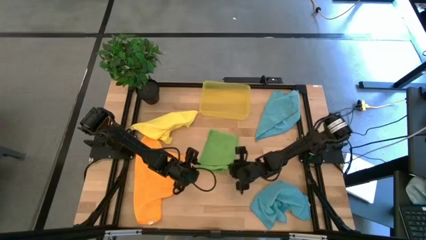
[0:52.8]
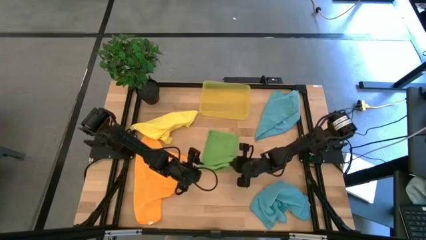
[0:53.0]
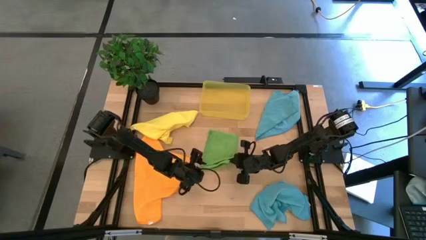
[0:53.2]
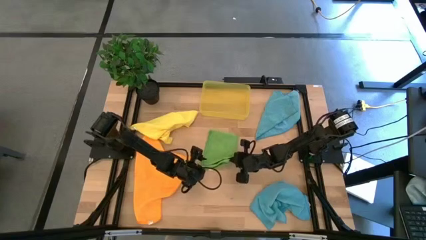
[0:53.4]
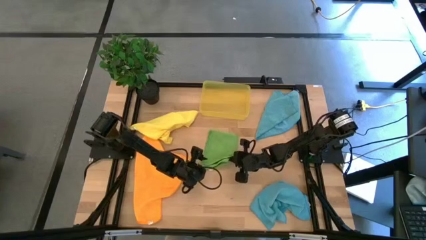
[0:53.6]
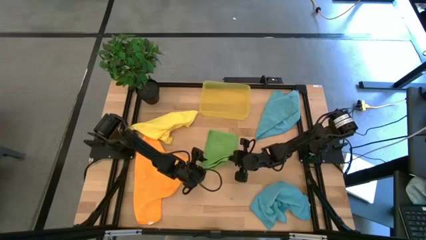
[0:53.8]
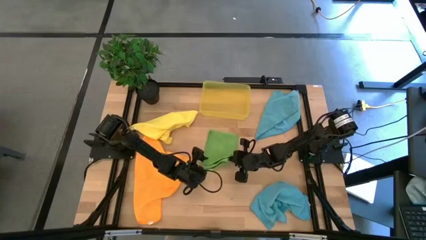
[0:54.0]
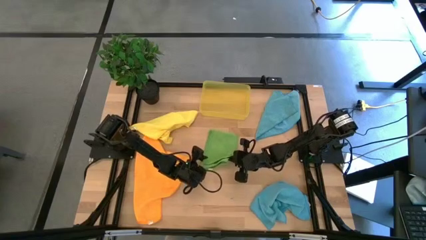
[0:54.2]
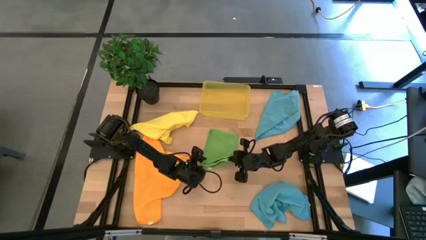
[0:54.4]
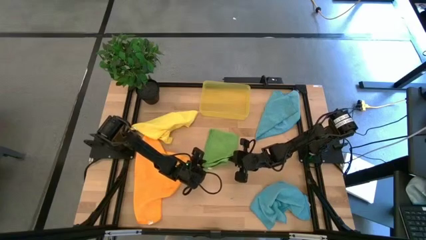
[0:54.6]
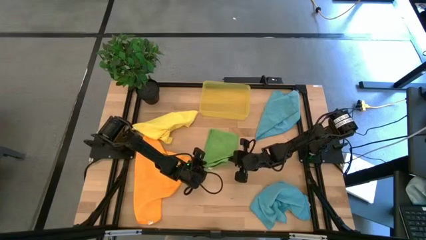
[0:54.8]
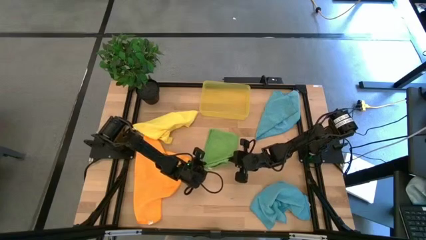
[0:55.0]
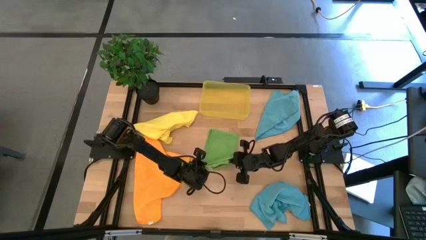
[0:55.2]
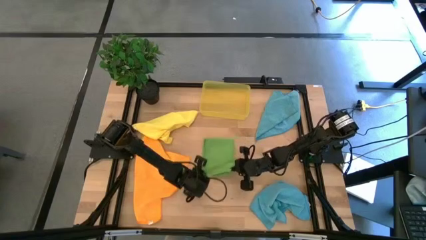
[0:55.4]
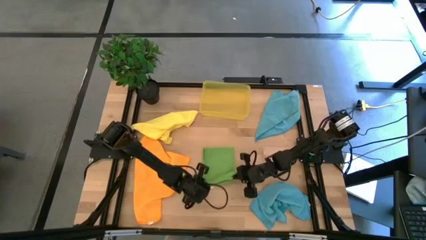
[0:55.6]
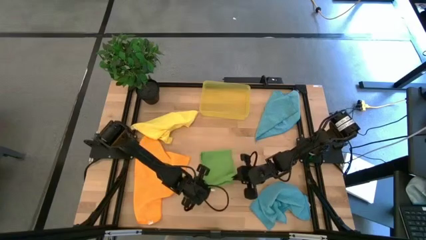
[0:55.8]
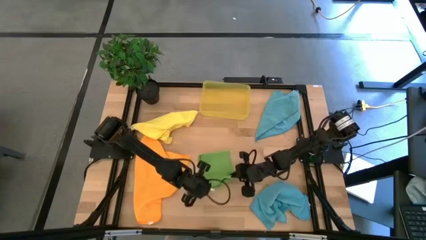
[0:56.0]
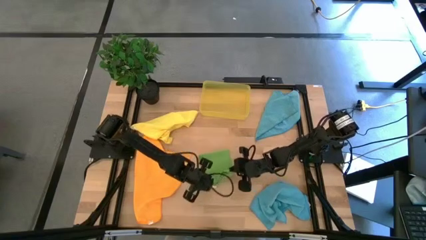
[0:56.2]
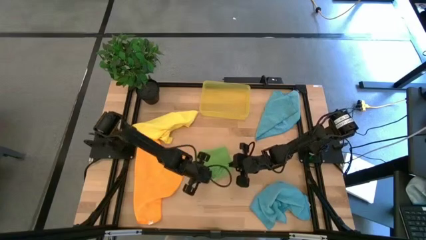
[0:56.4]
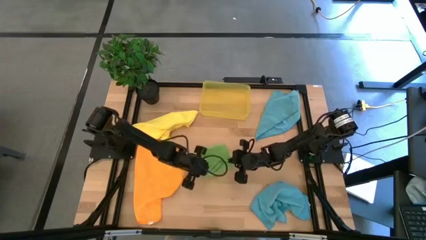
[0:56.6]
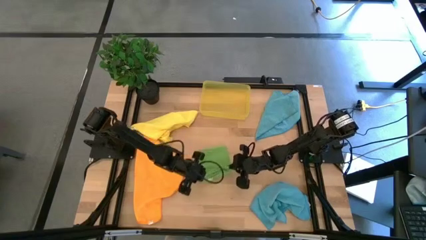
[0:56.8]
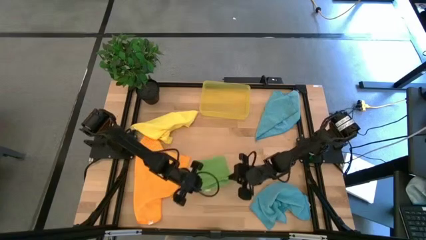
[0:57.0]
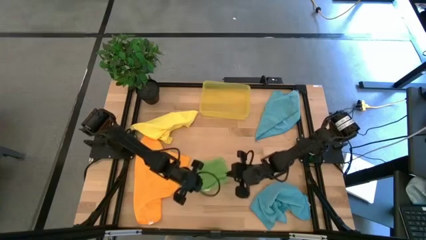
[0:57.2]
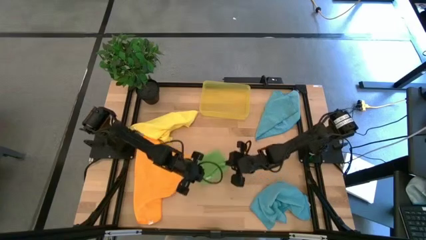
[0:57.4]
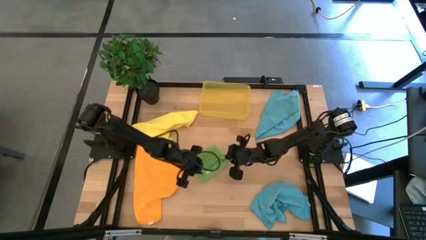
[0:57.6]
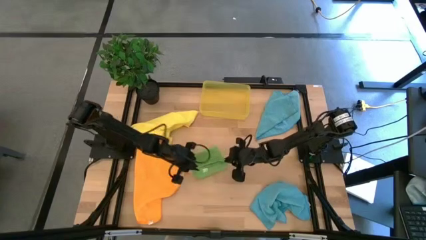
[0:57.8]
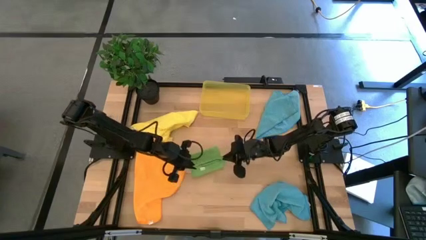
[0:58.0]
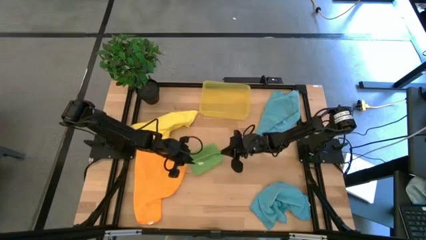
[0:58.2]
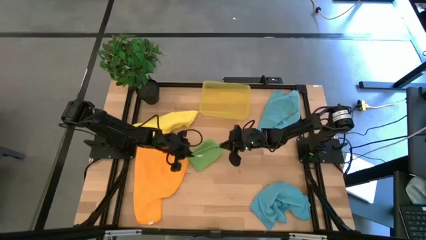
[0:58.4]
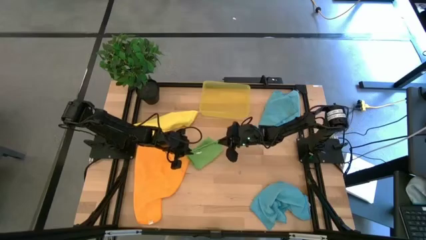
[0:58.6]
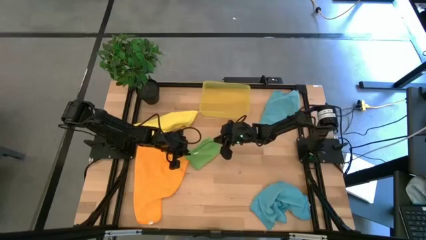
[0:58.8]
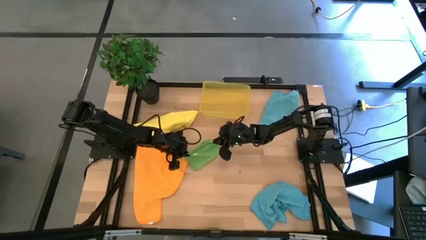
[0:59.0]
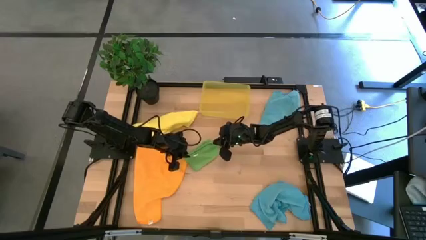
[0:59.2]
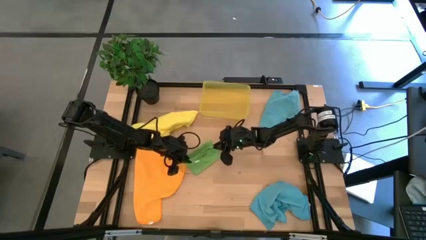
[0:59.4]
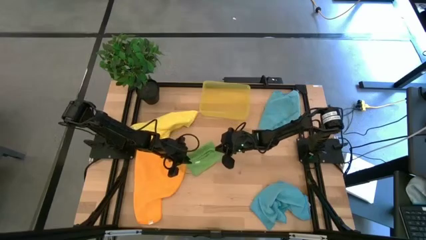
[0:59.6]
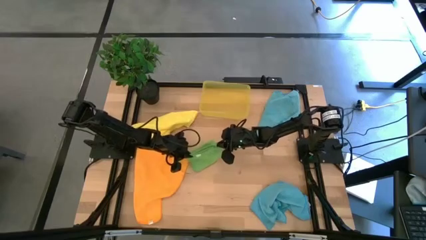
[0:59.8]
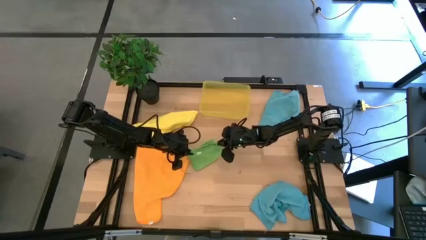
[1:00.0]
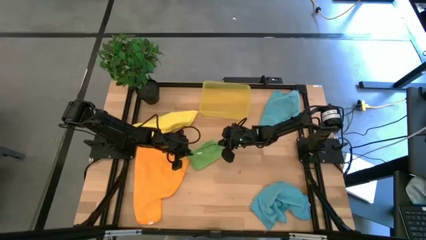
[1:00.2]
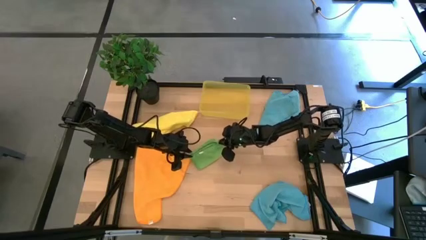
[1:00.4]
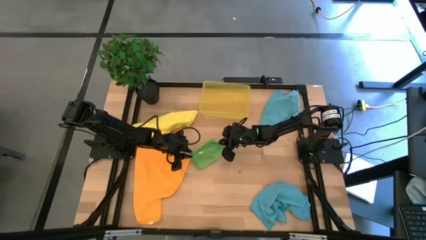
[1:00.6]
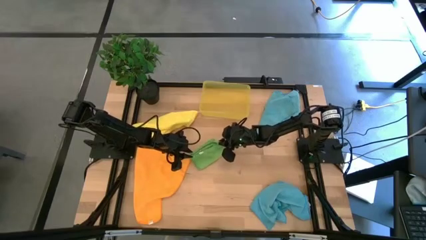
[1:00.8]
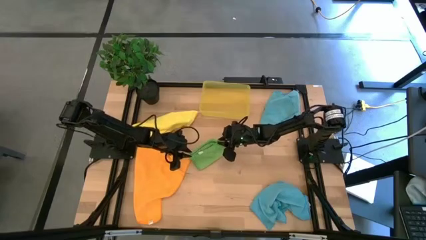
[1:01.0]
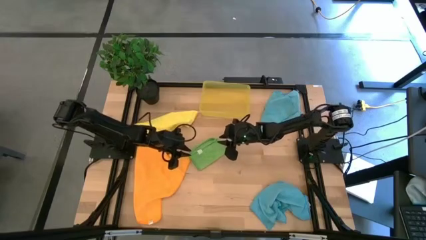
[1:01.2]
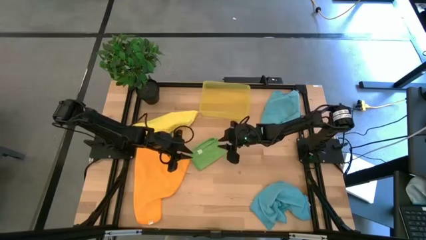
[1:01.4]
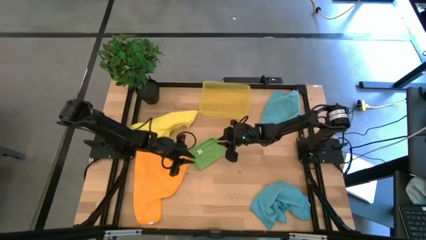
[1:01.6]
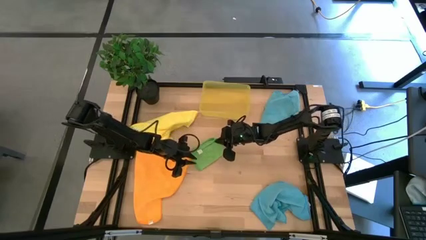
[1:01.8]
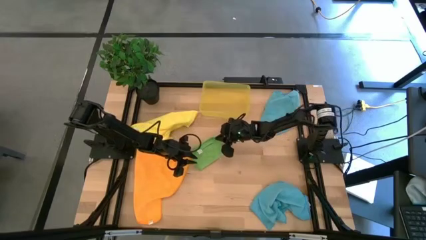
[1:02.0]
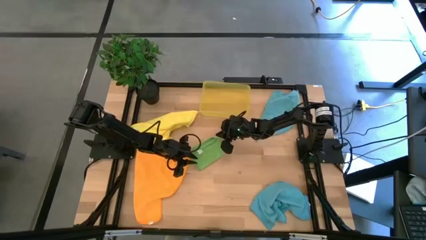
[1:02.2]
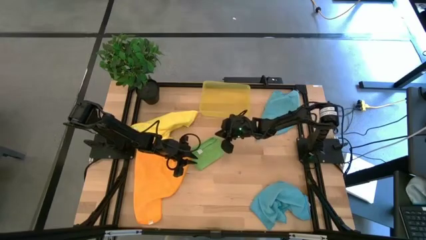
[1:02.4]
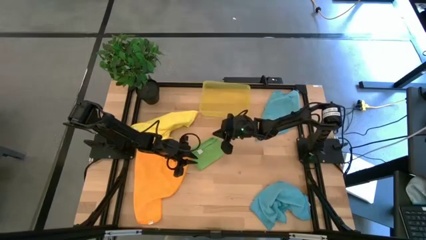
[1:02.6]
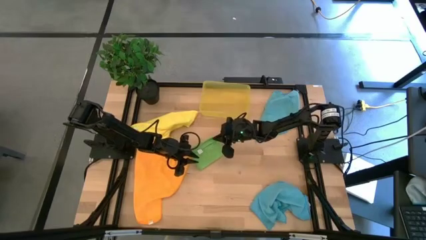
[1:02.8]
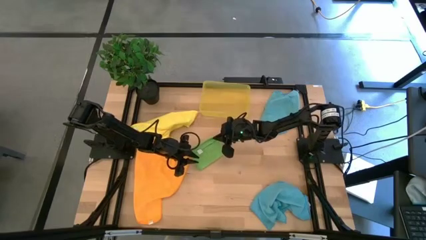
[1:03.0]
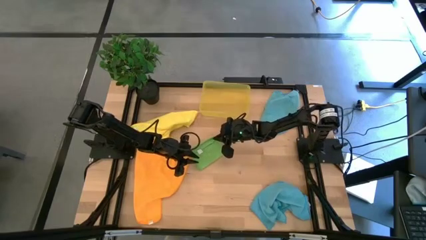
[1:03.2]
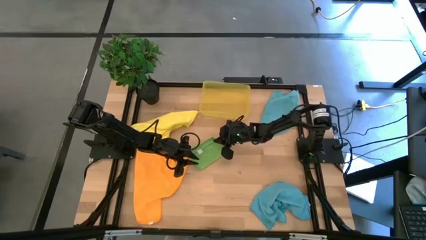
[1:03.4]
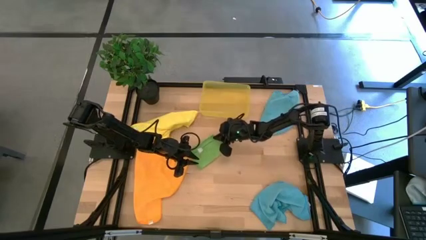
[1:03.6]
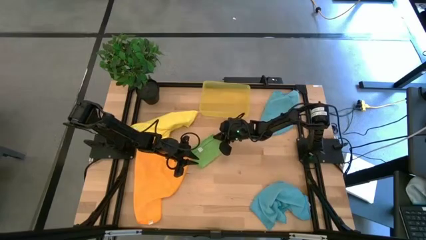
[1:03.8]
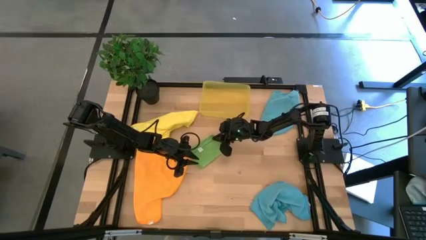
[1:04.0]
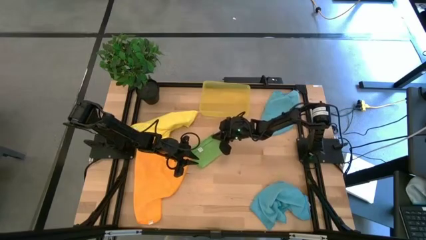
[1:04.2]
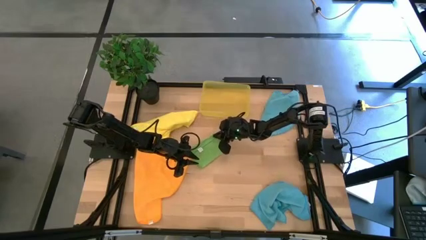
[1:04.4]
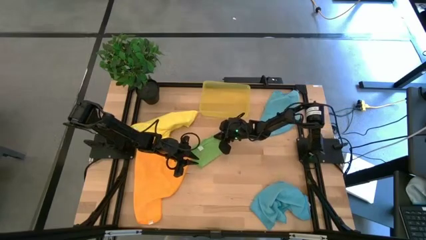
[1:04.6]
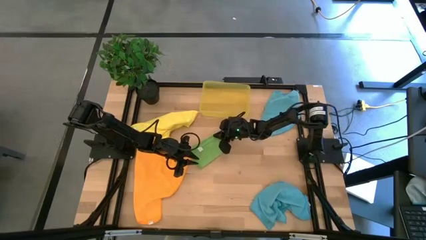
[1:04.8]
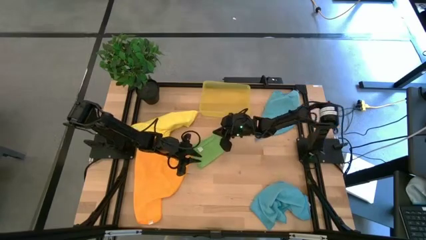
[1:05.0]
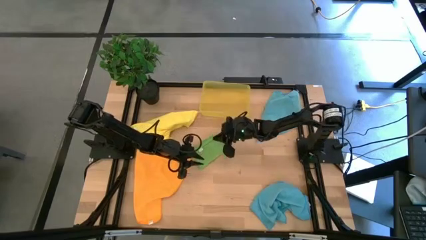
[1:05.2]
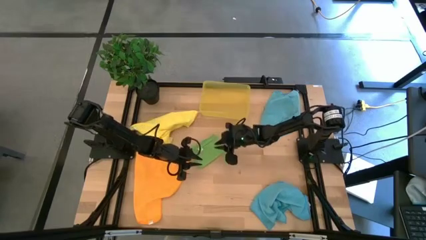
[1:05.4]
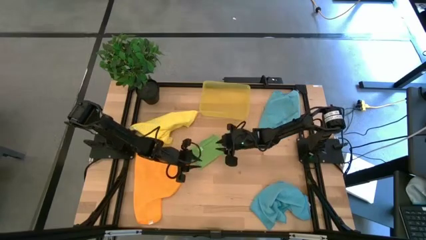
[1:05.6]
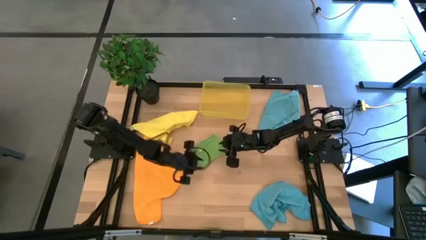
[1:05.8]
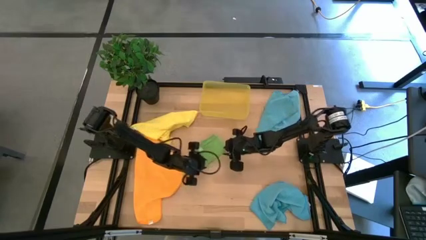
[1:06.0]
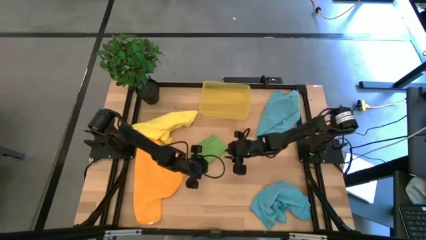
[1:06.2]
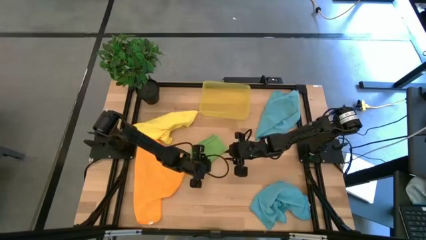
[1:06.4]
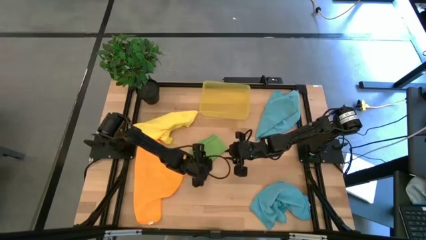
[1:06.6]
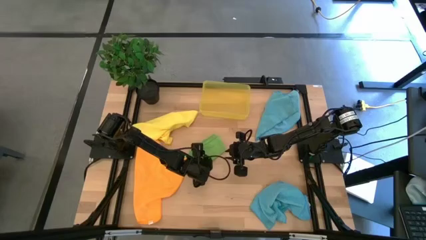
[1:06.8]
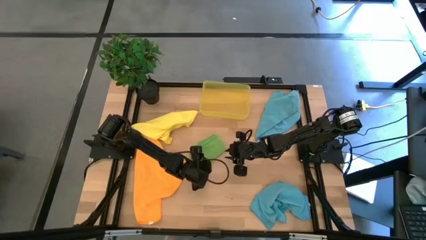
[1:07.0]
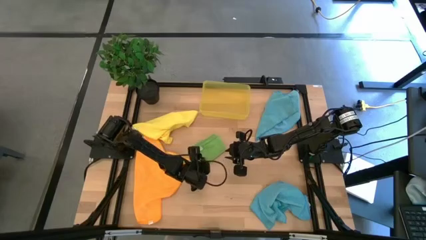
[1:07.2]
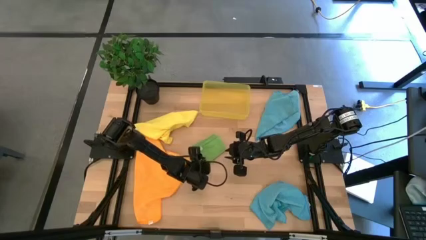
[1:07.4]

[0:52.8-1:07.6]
Task: Fold microfiber towels
Fold the green microfiber cloth
